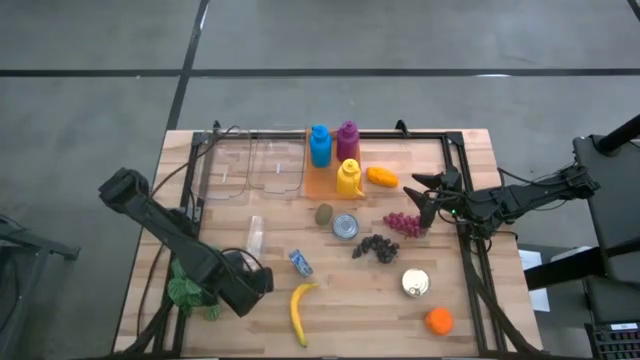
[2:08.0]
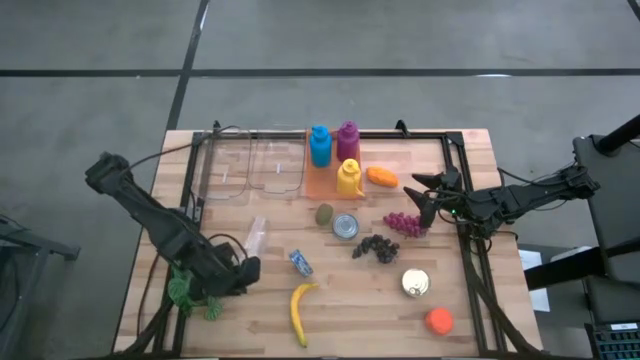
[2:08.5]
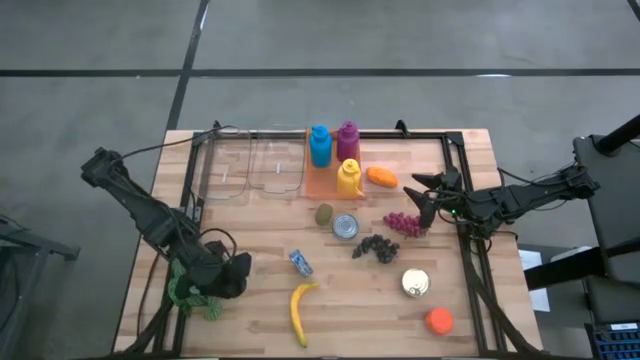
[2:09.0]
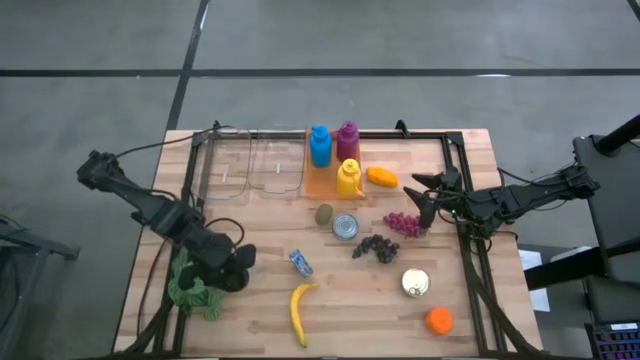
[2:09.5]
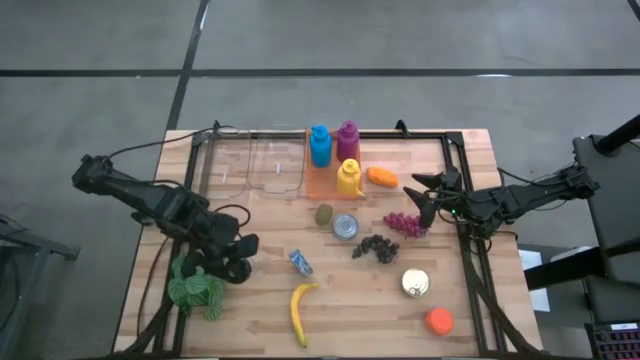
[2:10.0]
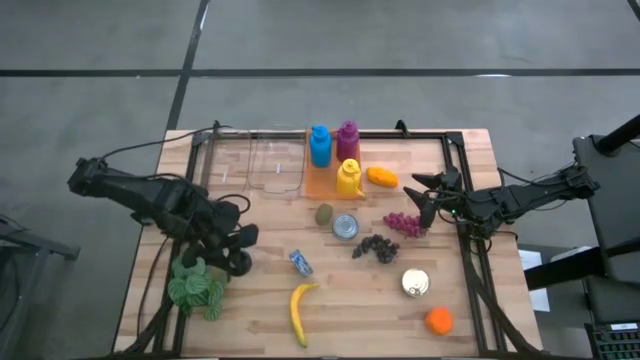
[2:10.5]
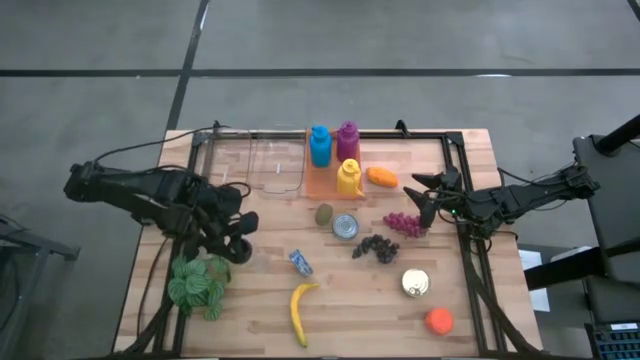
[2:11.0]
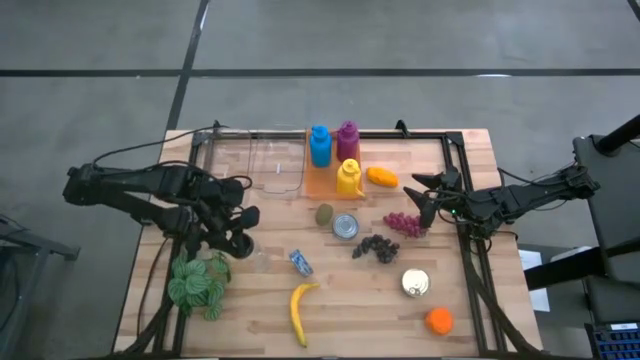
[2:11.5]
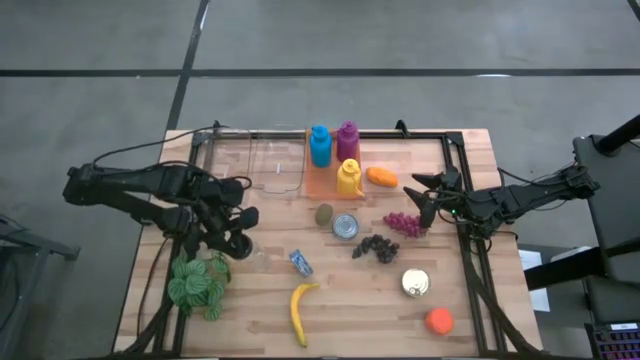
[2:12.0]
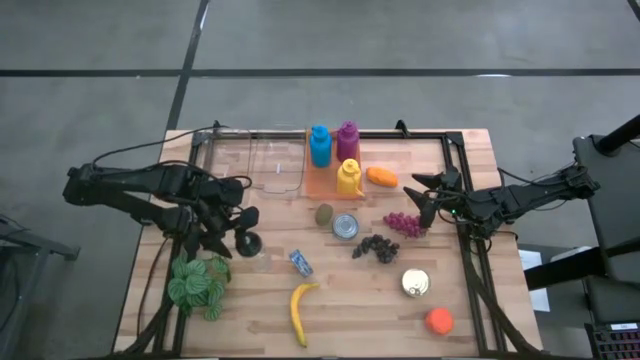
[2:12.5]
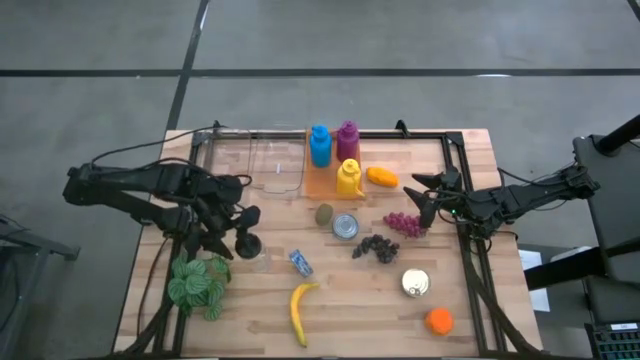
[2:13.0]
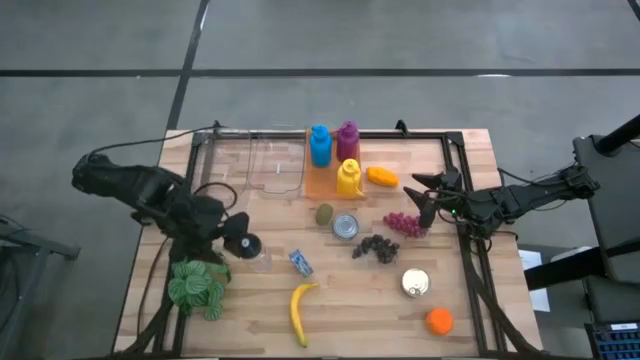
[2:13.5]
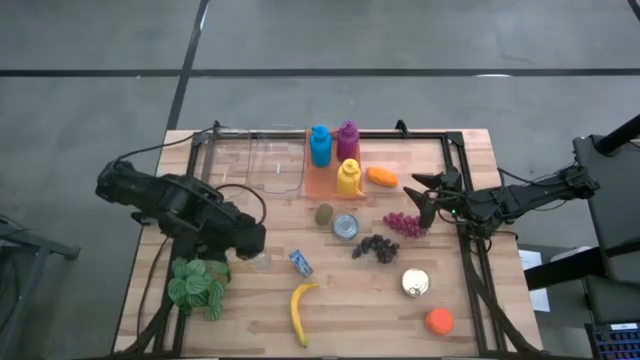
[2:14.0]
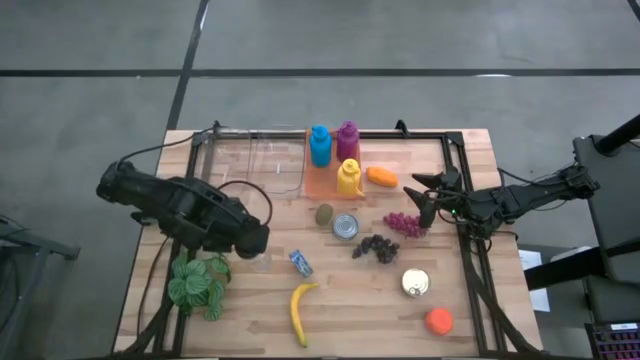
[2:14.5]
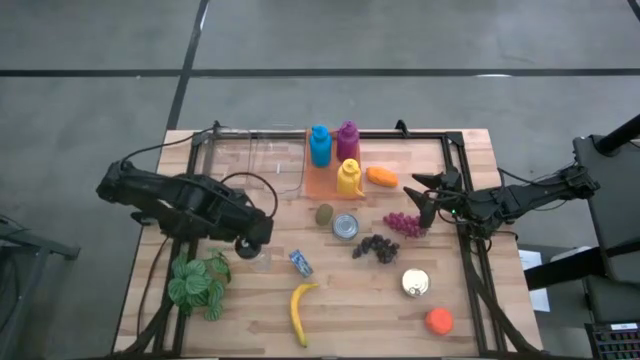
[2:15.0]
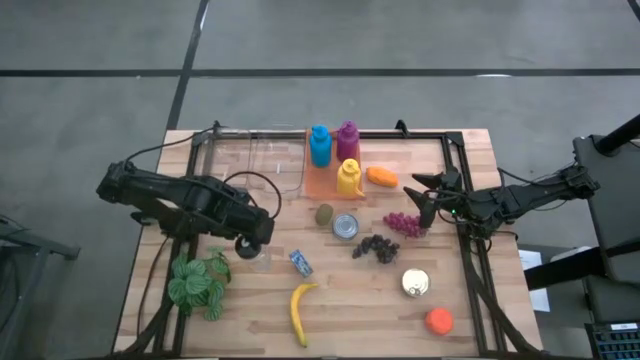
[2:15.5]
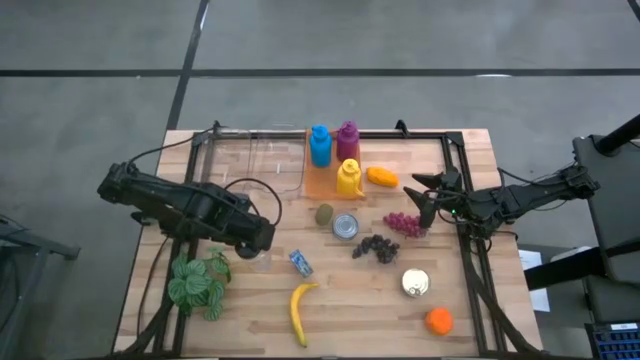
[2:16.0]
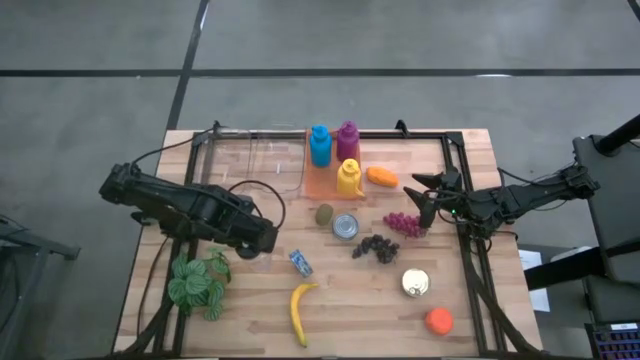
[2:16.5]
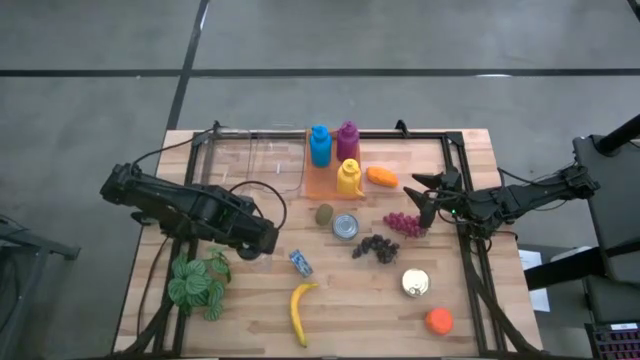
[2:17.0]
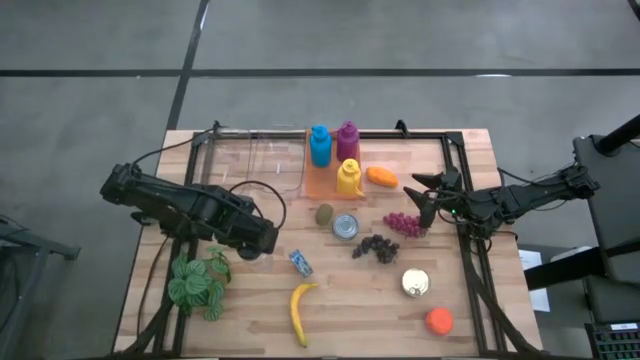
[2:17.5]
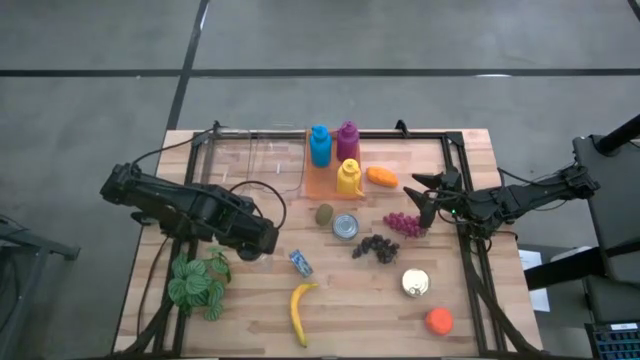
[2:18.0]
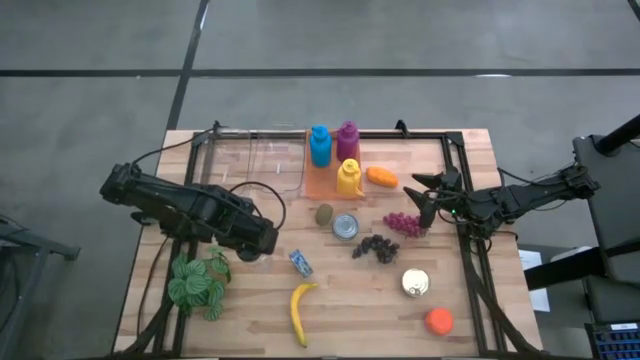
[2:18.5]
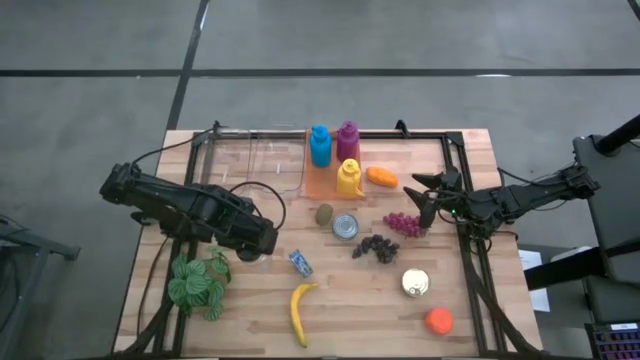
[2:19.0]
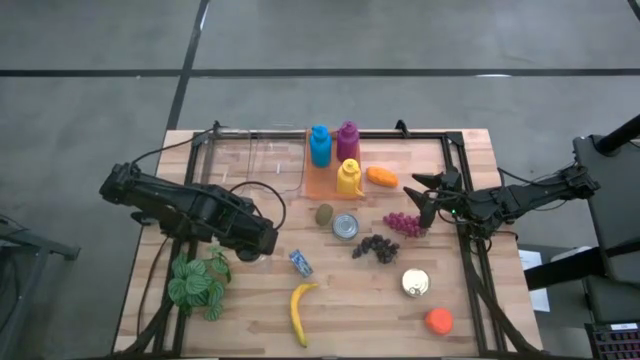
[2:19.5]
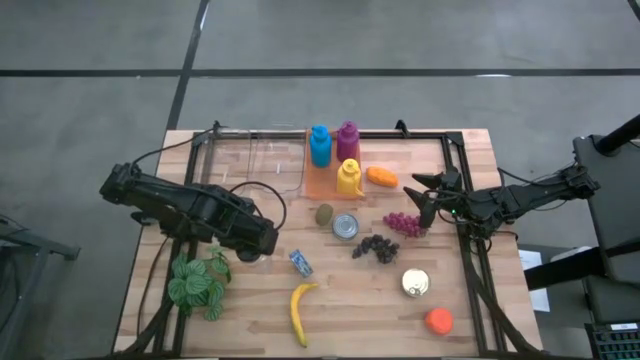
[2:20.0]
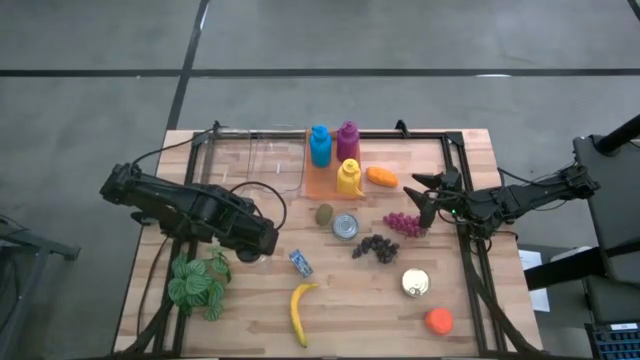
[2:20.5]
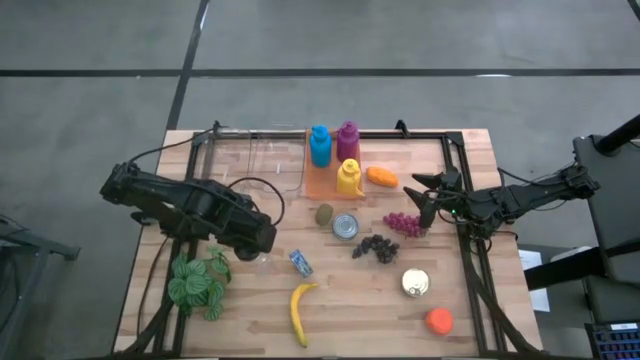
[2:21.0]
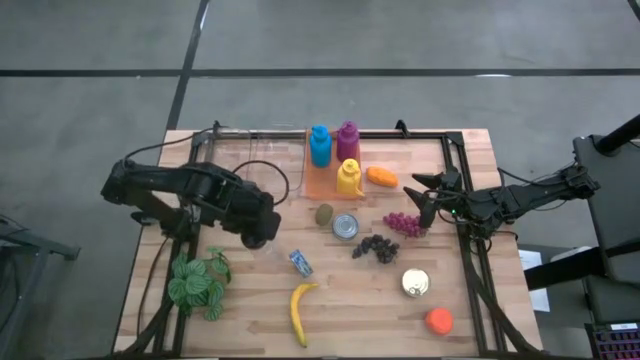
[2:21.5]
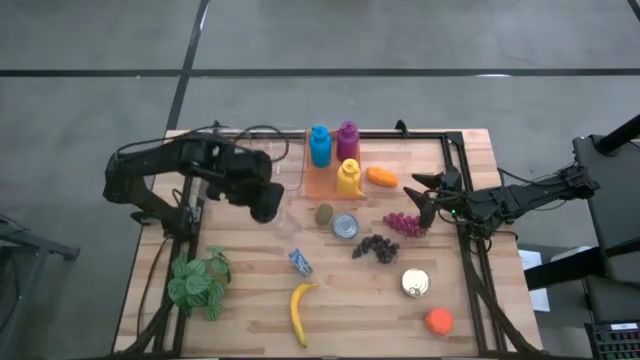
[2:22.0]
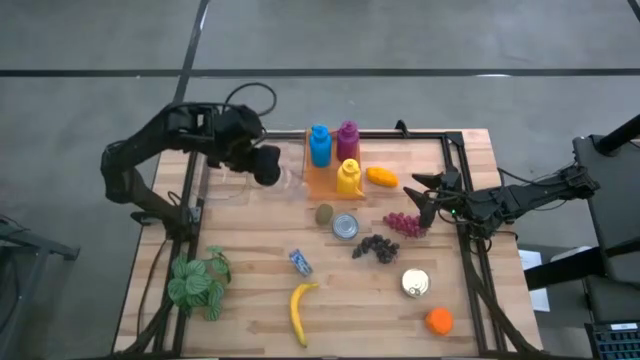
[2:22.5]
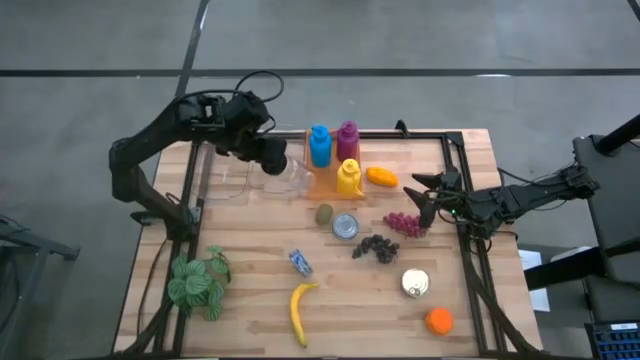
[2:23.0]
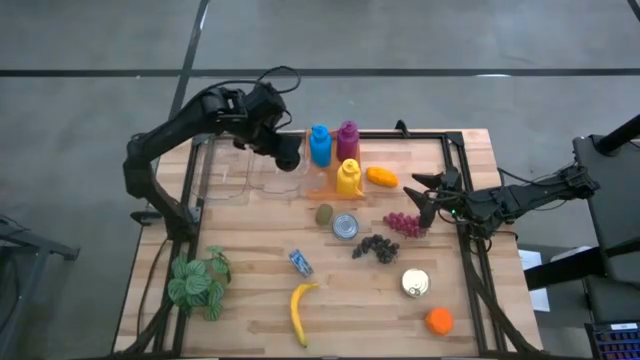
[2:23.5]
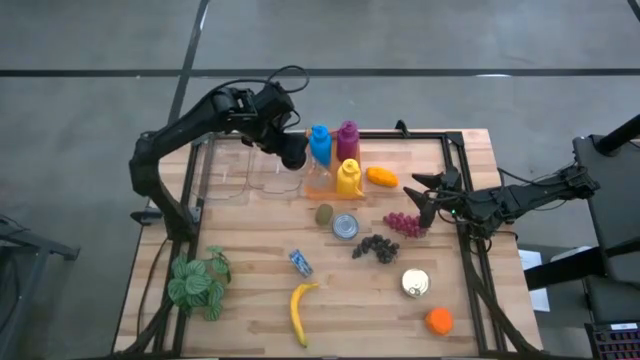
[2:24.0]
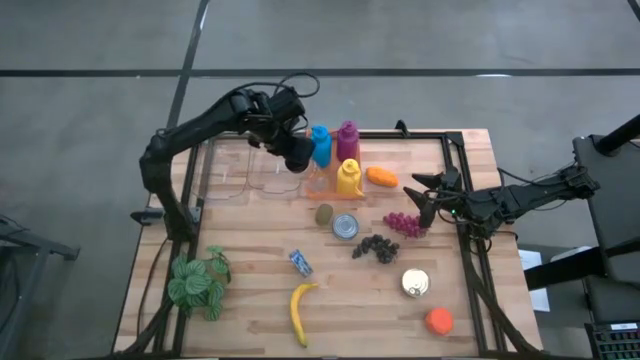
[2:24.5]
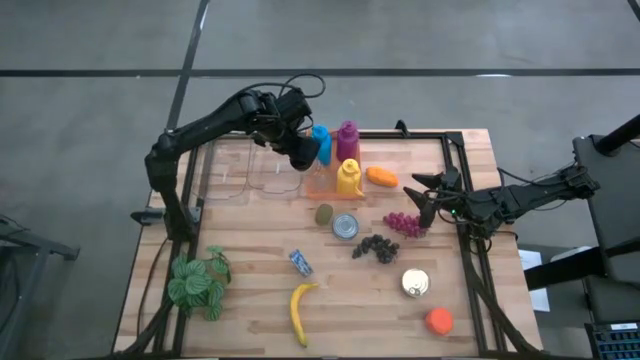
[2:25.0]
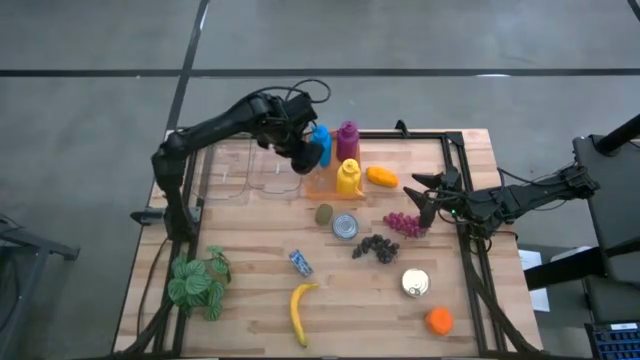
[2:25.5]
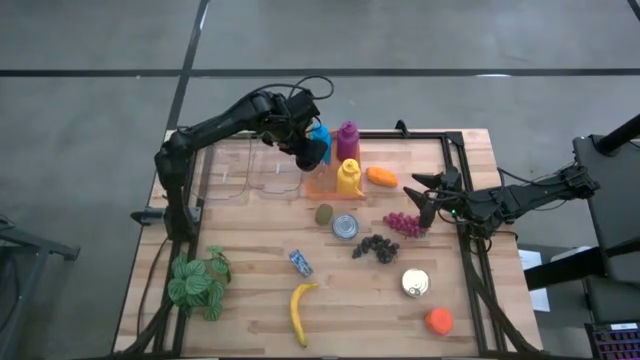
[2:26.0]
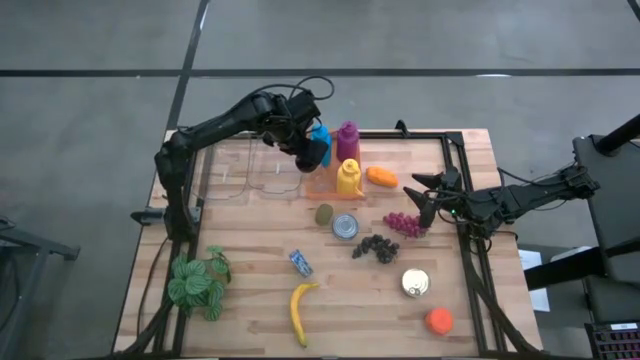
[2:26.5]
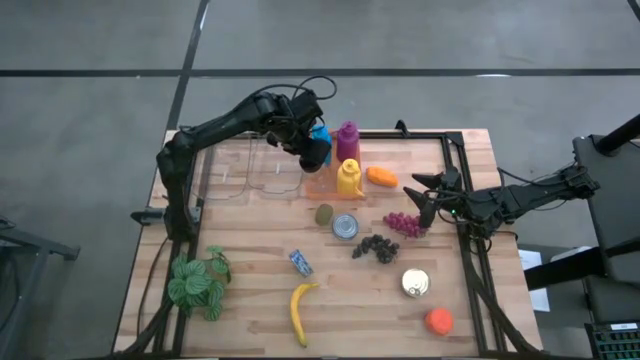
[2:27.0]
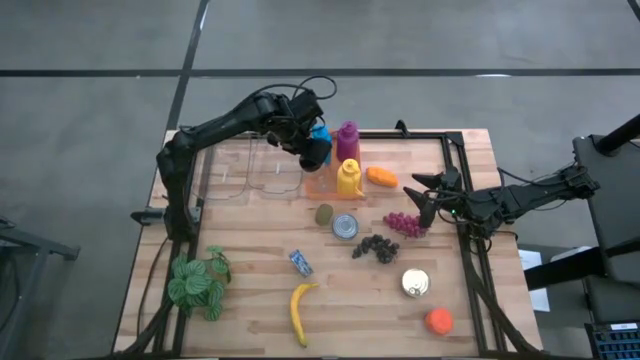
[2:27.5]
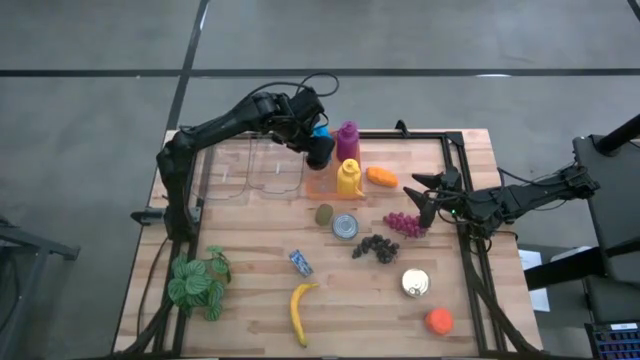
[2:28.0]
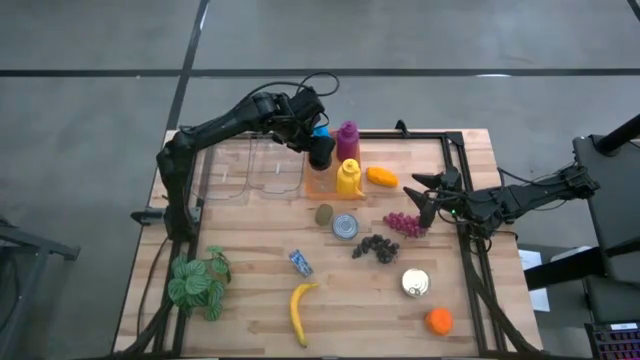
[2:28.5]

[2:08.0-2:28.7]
Task: Pick & Place Food Item
Put the transparent tumbler into the orange bin
